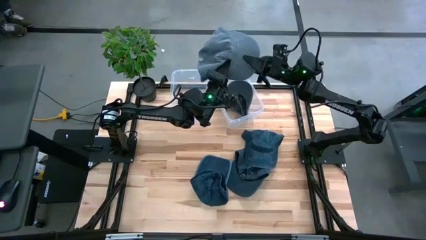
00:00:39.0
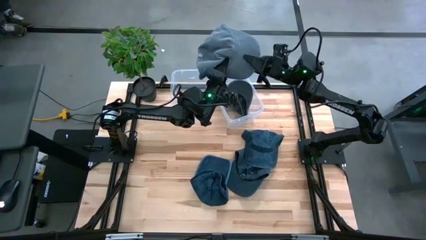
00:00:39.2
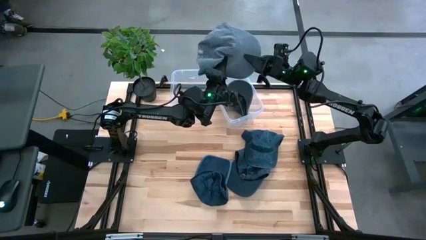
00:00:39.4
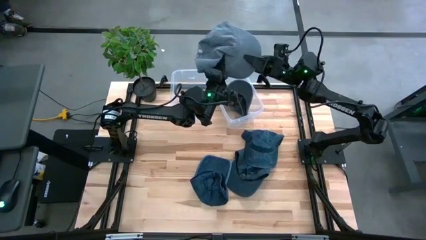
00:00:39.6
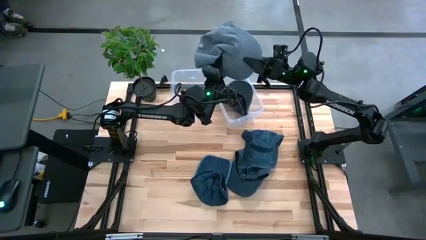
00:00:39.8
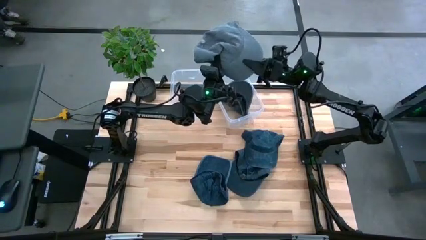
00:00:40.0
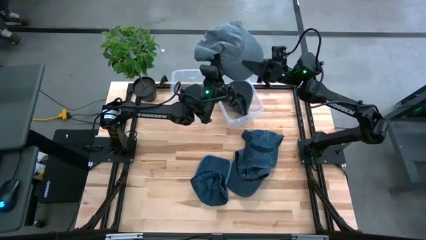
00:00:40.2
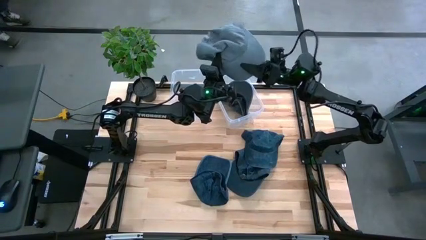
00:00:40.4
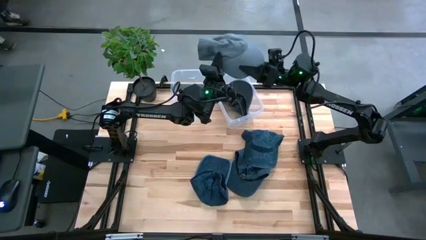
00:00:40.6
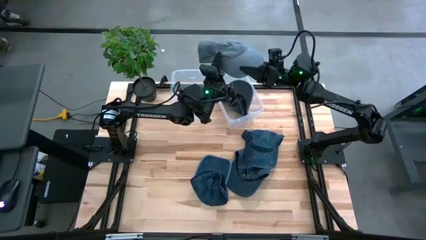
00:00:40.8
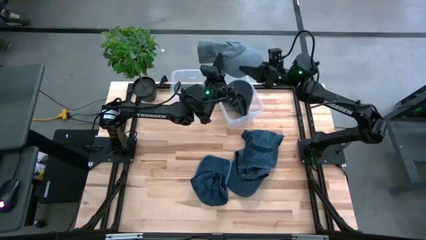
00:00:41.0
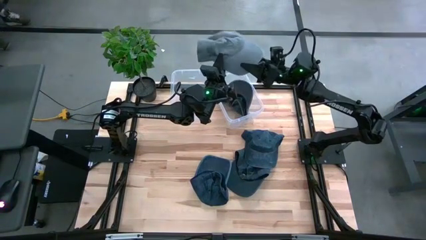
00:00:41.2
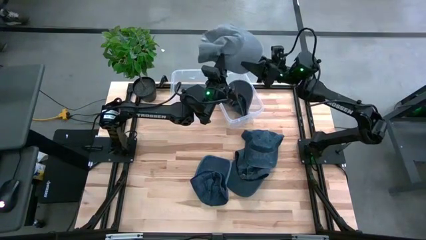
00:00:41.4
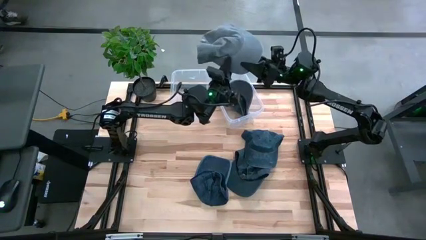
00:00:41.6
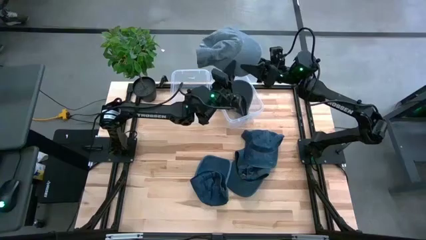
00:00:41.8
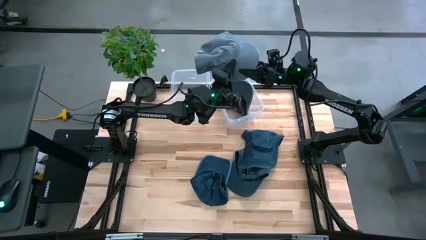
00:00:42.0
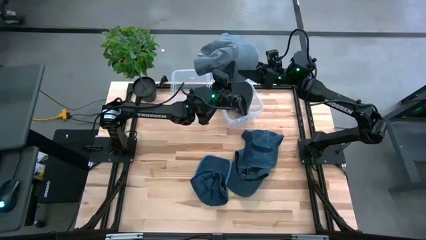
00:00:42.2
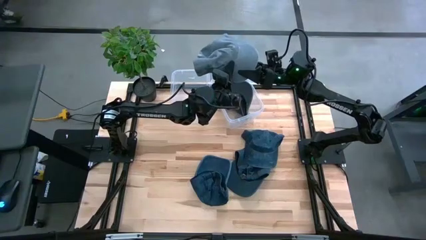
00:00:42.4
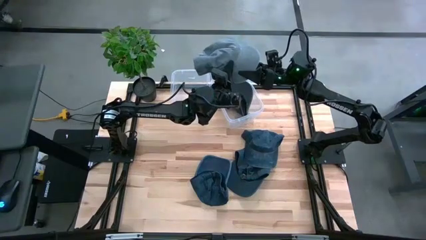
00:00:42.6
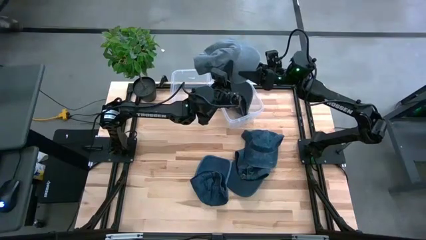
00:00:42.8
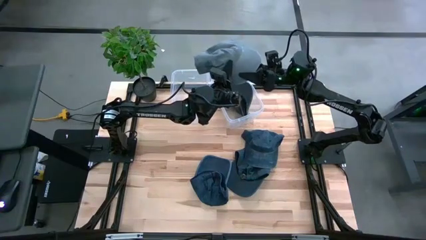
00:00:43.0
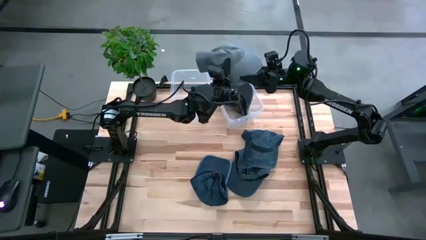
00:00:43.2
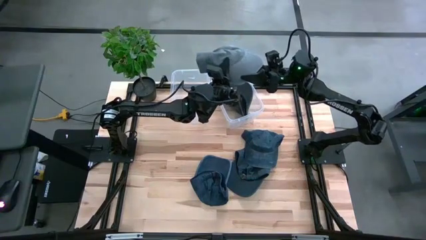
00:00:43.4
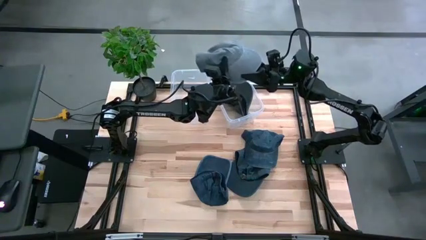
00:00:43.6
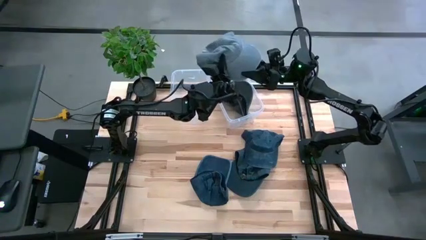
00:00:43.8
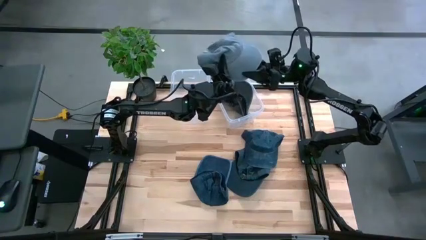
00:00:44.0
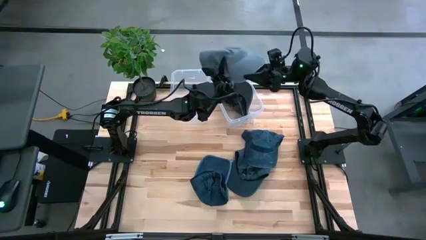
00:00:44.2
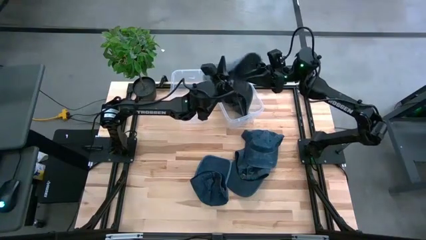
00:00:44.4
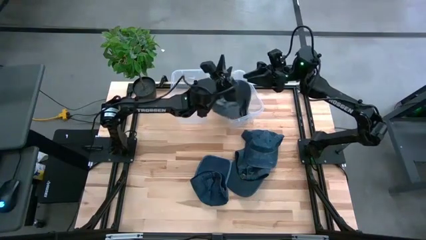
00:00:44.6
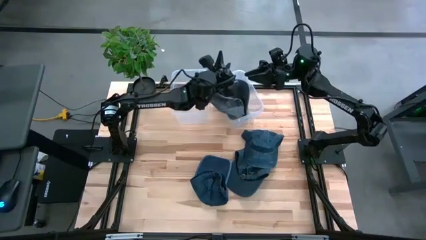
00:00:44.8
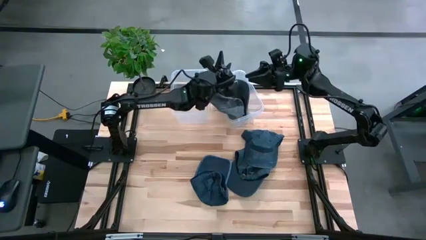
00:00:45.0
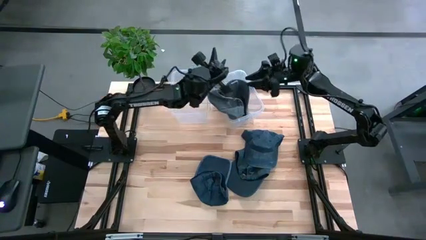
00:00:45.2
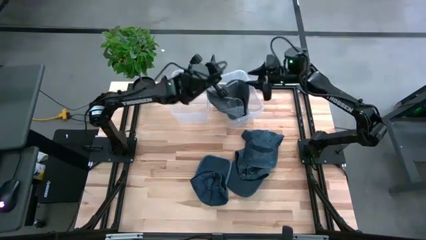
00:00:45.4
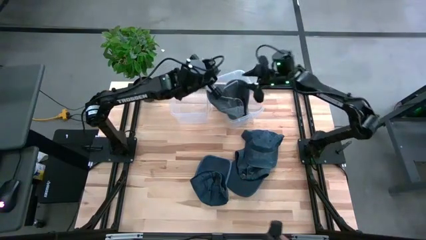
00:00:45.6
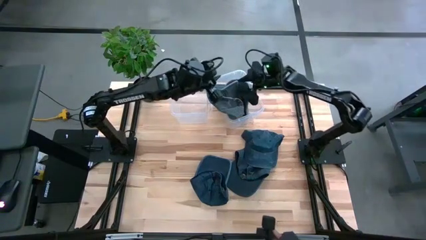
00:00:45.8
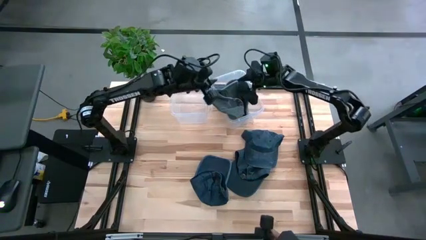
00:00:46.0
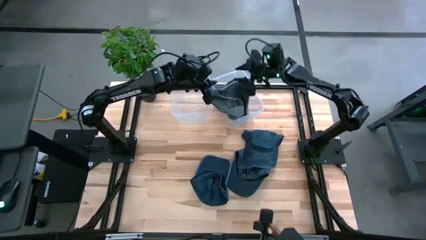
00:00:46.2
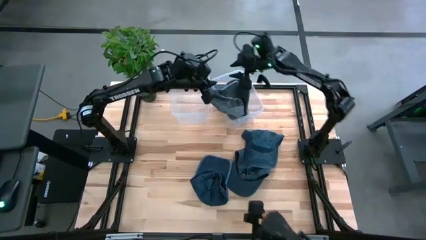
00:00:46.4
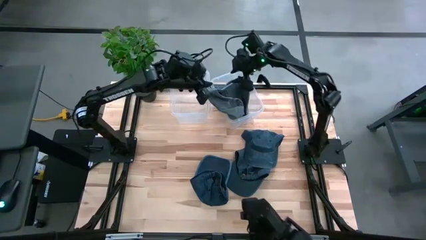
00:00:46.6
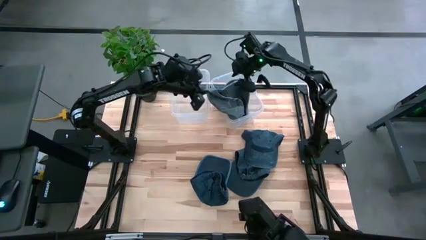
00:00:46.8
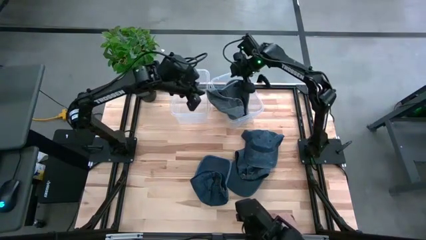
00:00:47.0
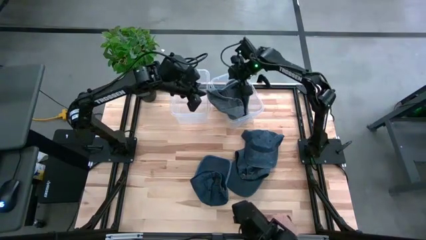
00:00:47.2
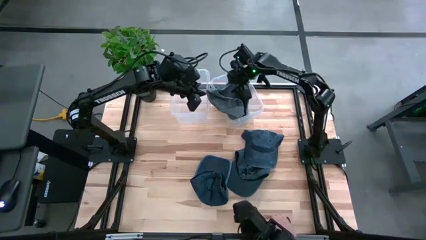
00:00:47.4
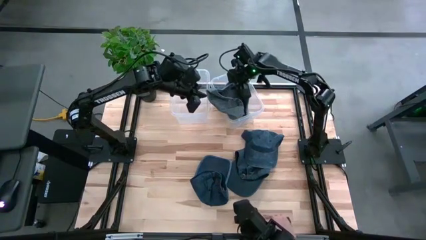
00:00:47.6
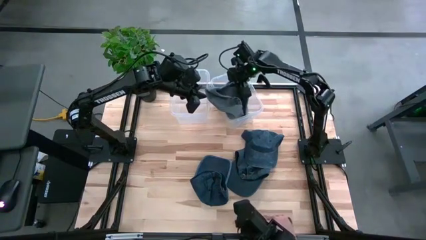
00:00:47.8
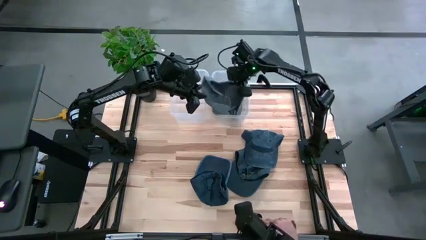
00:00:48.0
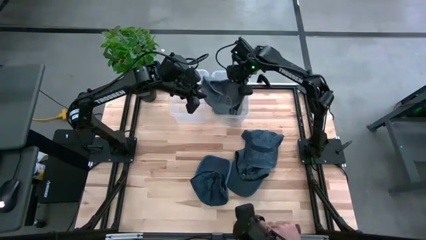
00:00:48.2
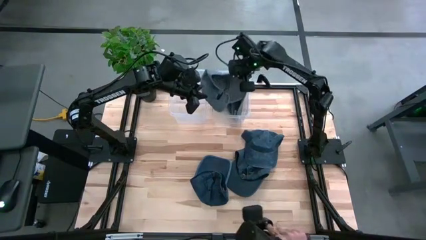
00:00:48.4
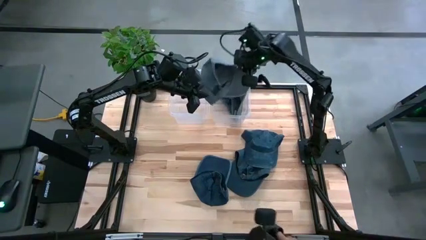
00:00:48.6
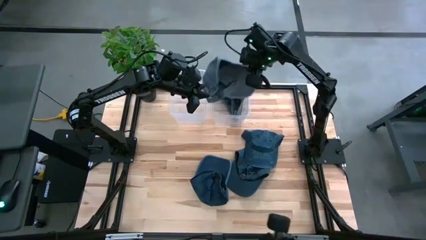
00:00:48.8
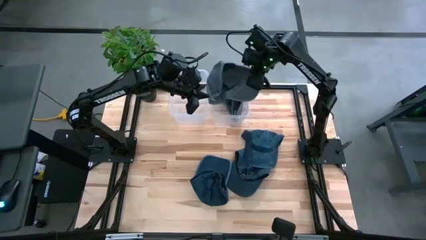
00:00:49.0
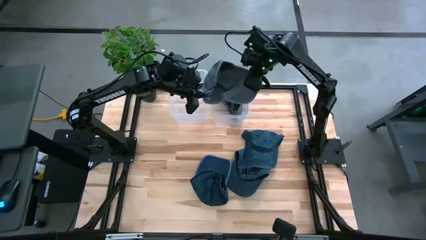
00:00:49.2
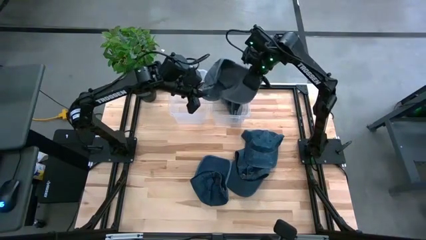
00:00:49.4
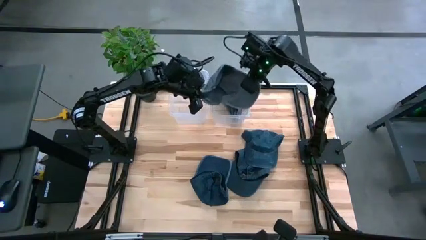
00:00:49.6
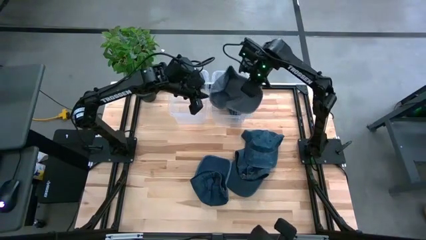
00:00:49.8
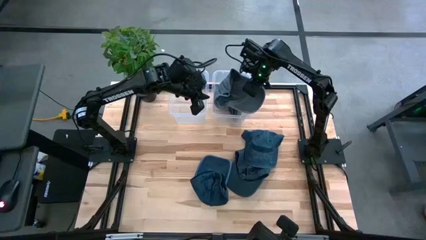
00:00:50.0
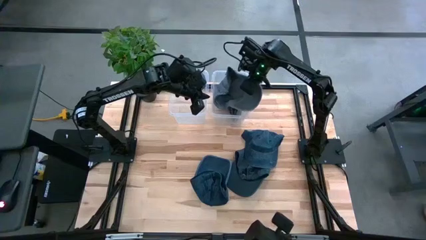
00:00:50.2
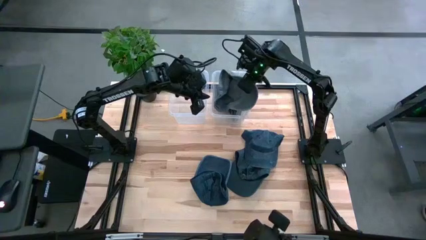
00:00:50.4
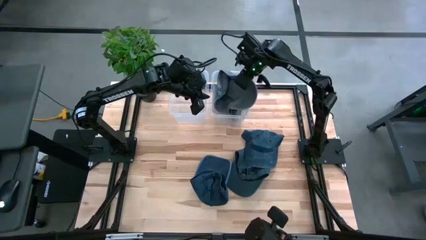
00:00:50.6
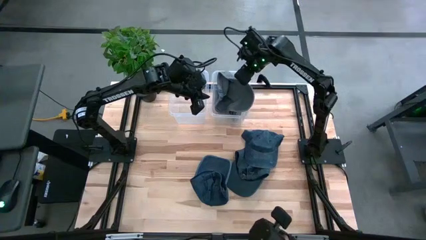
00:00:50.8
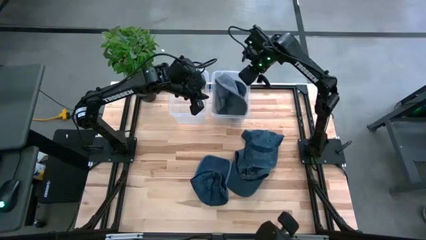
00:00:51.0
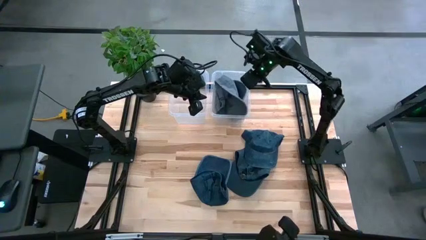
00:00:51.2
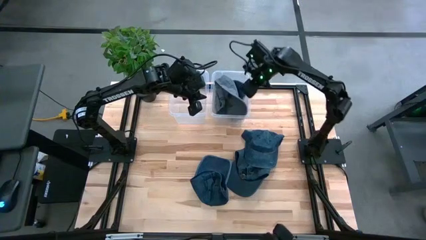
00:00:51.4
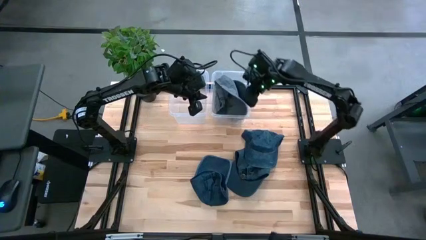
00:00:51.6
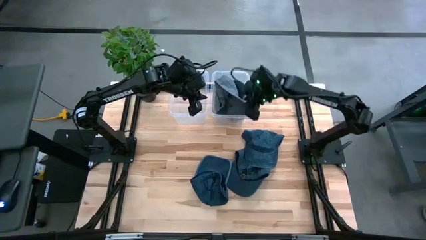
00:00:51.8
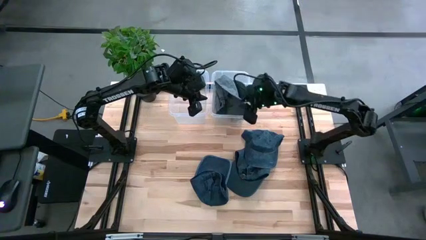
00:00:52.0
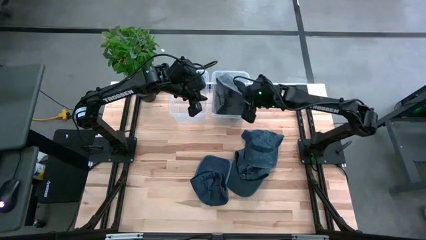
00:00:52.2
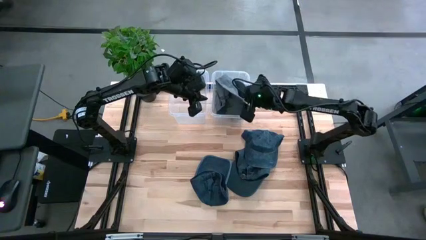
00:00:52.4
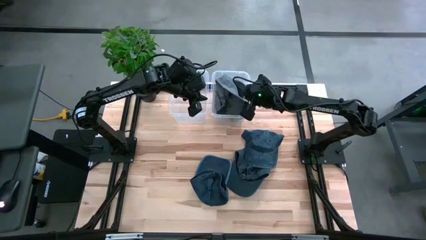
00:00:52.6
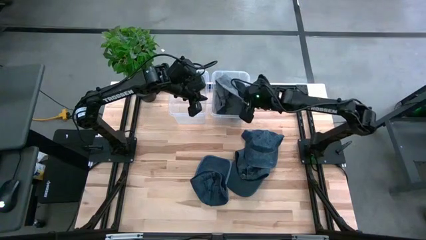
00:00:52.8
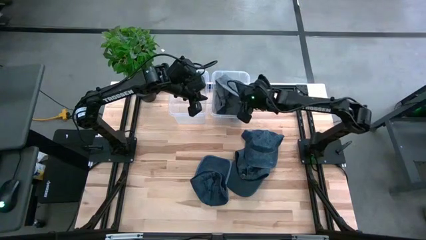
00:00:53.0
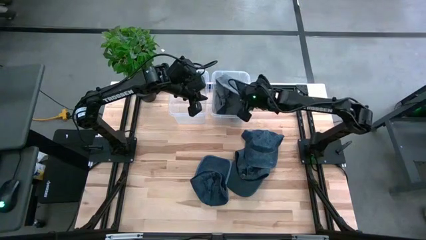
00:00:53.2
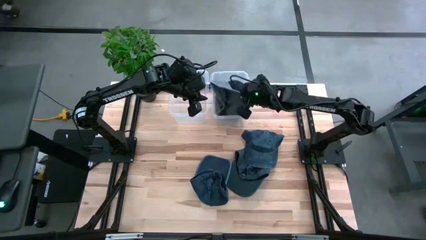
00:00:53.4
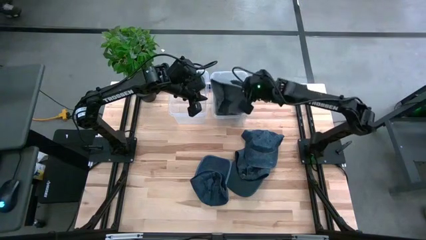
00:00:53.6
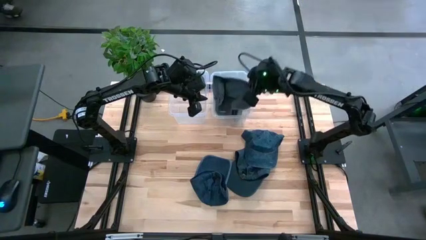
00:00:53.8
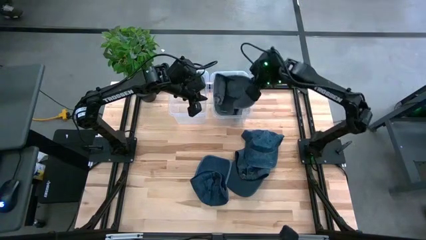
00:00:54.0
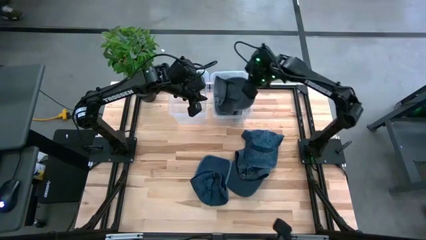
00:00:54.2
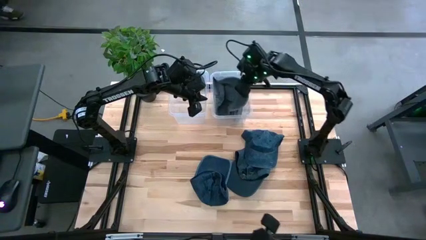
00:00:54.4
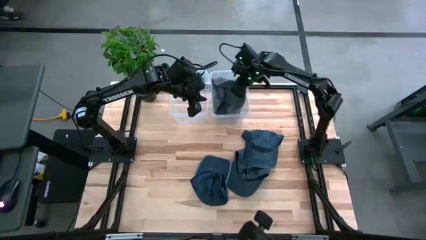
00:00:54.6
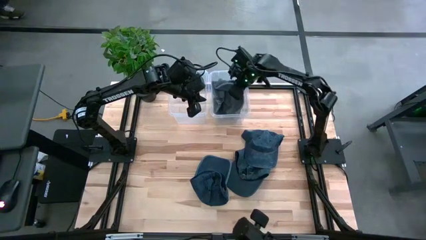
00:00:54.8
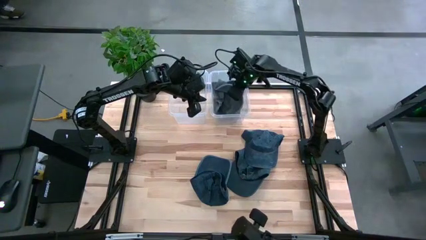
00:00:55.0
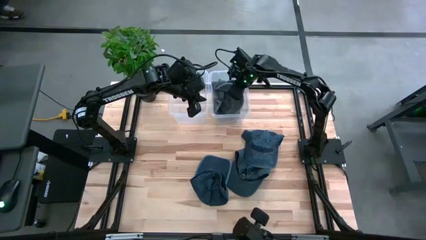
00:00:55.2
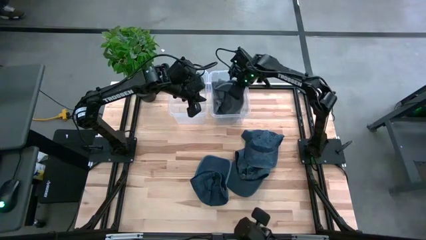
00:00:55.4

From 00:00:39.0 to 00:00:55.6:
Task: Pick & Place hat
Put the gray cap into the right transparent bin
